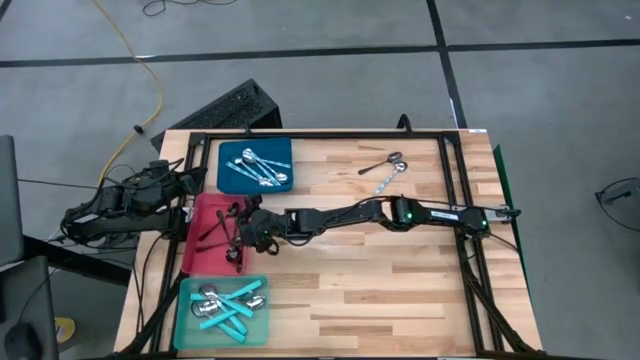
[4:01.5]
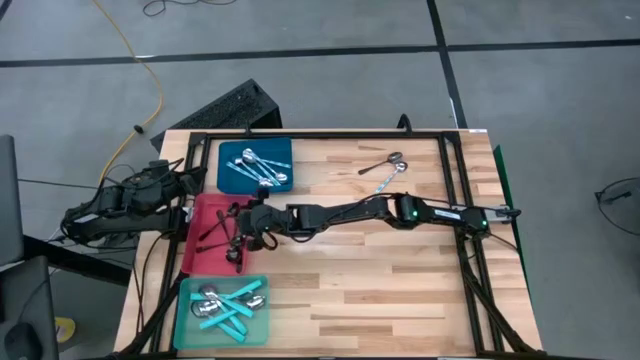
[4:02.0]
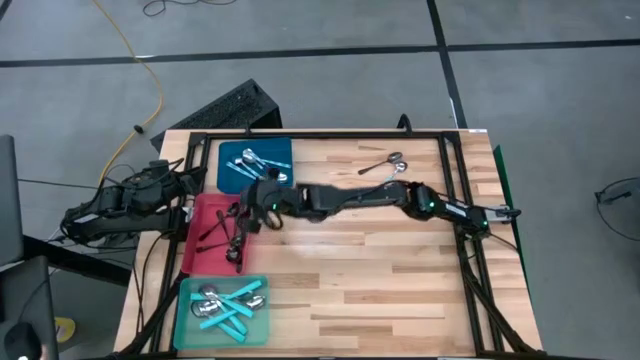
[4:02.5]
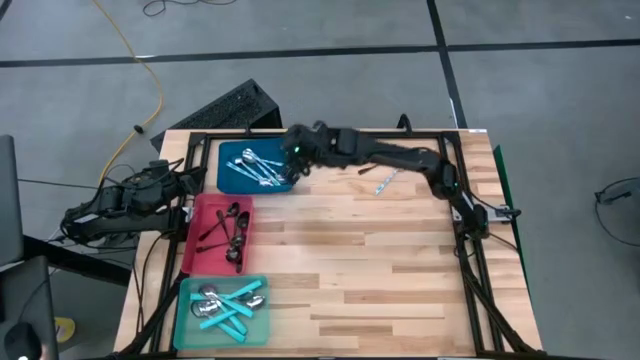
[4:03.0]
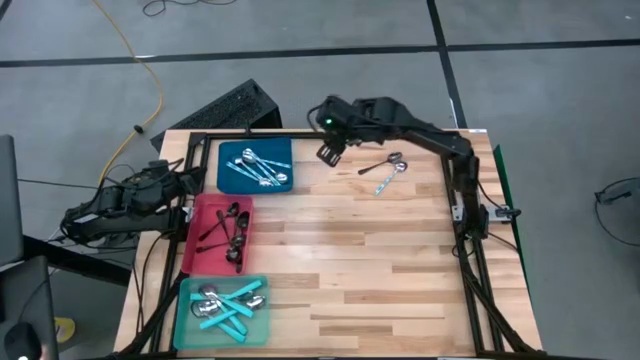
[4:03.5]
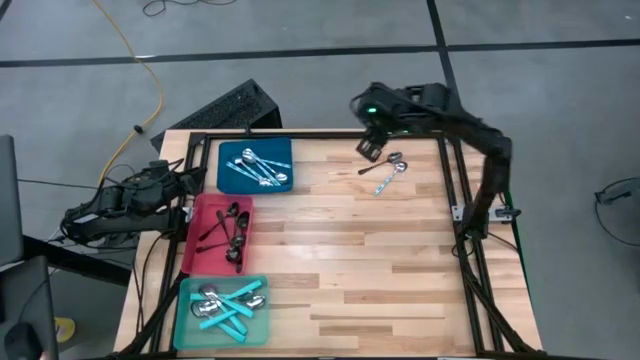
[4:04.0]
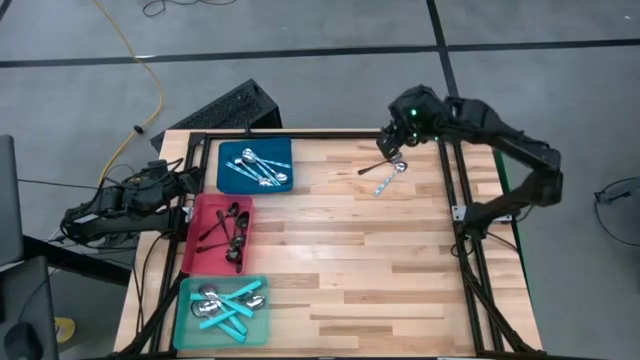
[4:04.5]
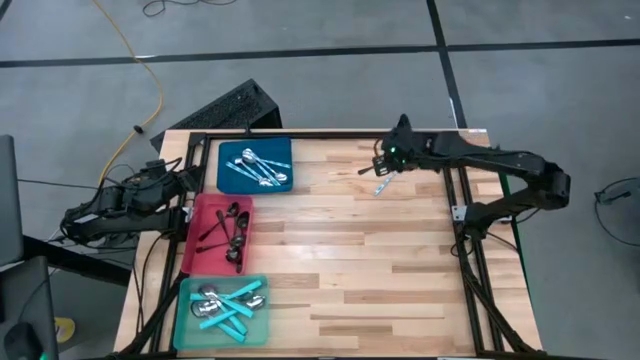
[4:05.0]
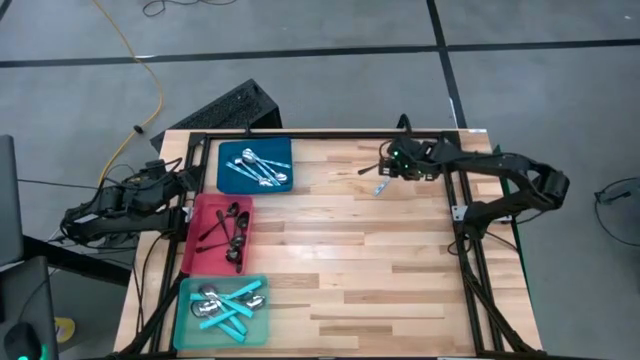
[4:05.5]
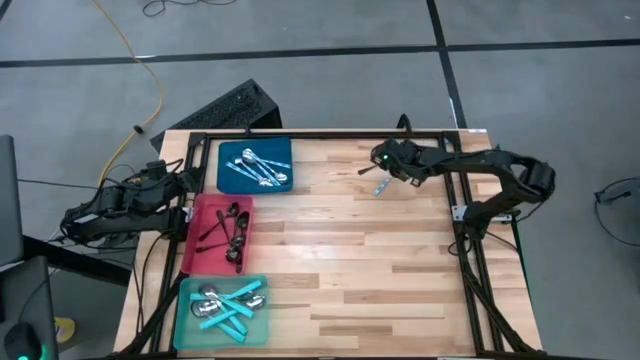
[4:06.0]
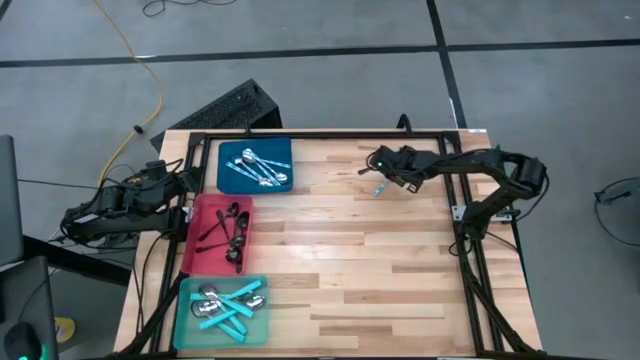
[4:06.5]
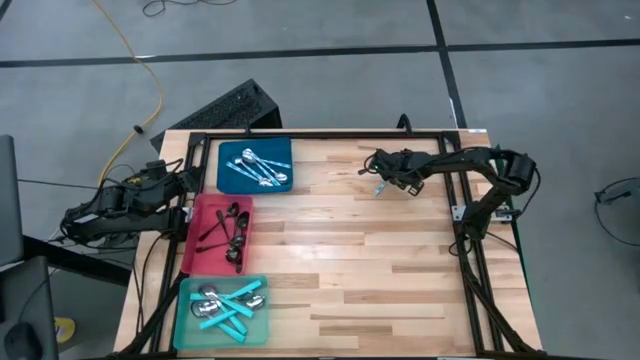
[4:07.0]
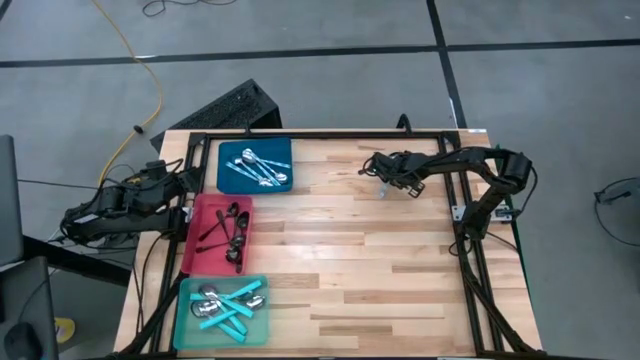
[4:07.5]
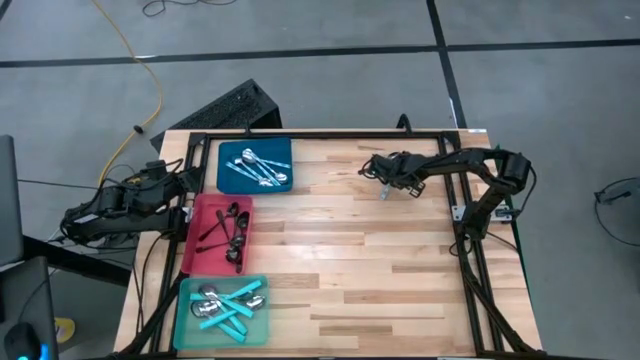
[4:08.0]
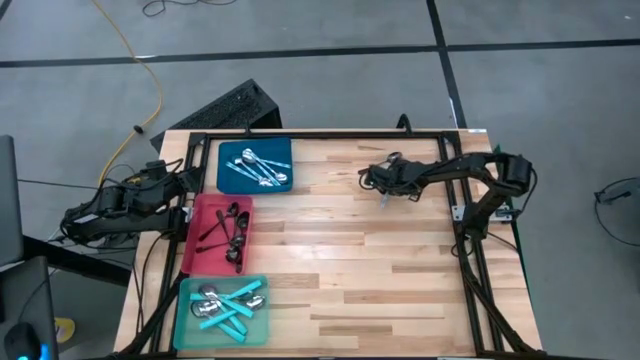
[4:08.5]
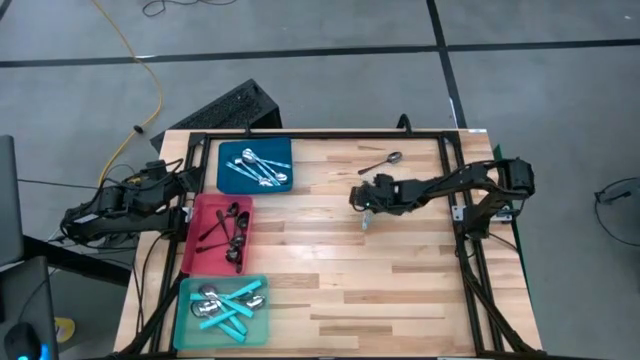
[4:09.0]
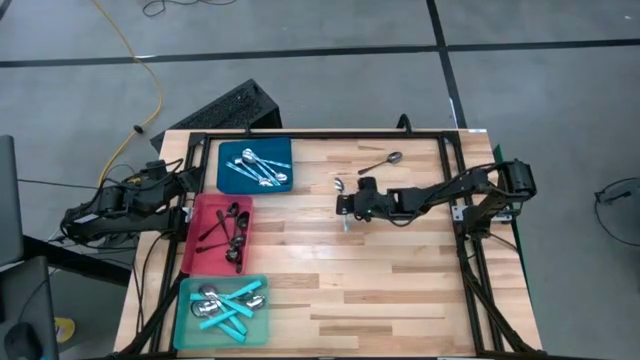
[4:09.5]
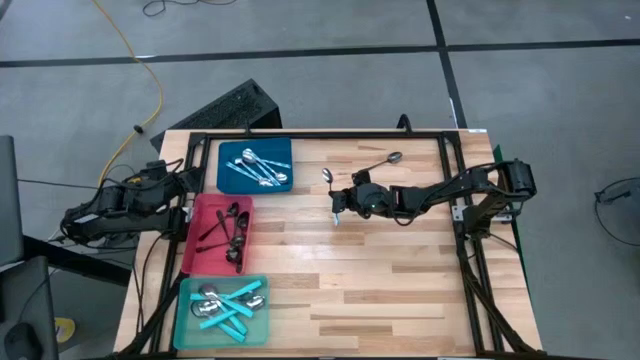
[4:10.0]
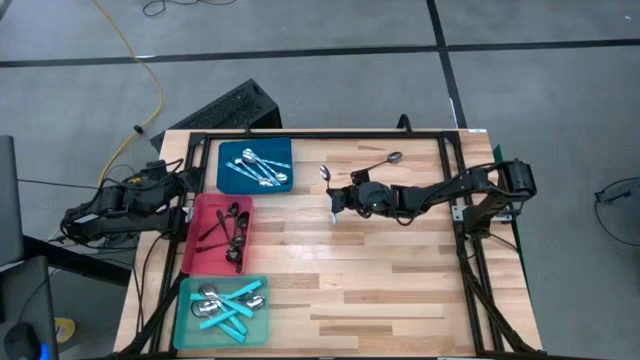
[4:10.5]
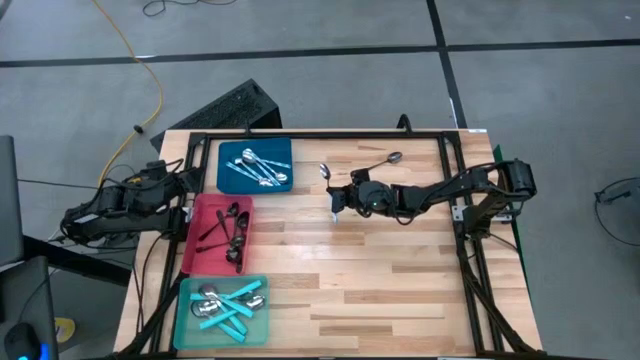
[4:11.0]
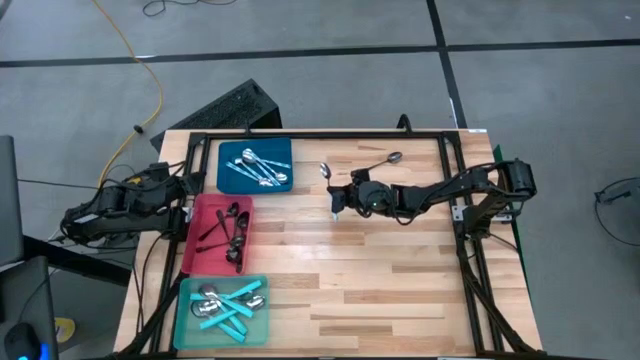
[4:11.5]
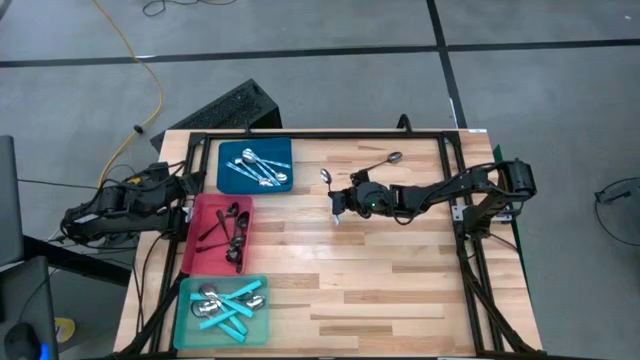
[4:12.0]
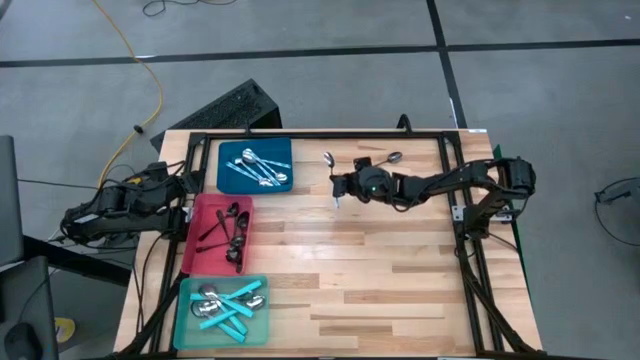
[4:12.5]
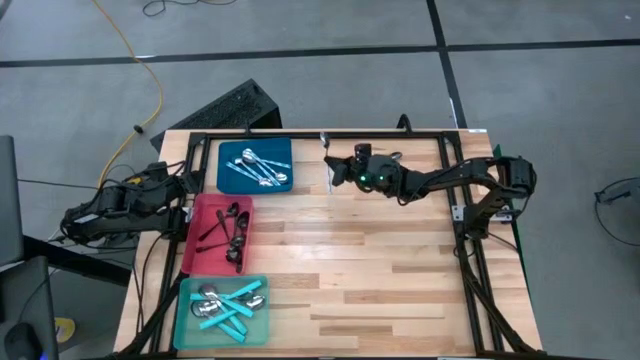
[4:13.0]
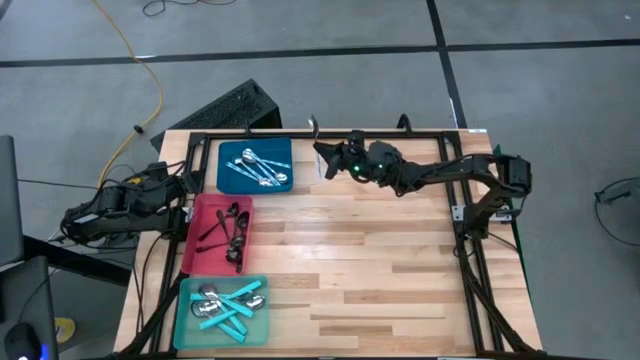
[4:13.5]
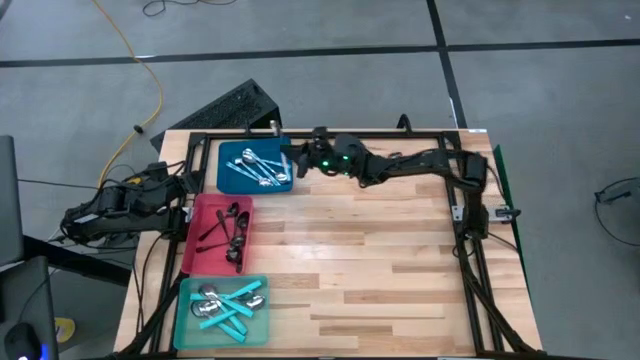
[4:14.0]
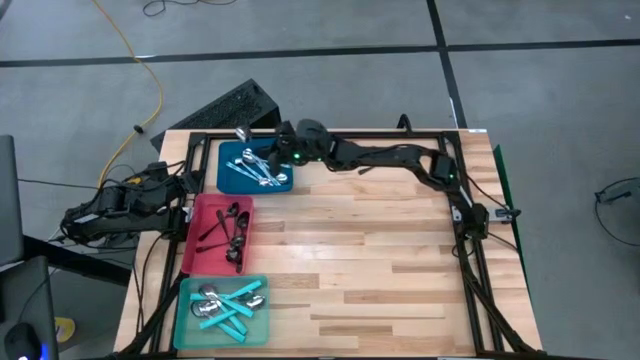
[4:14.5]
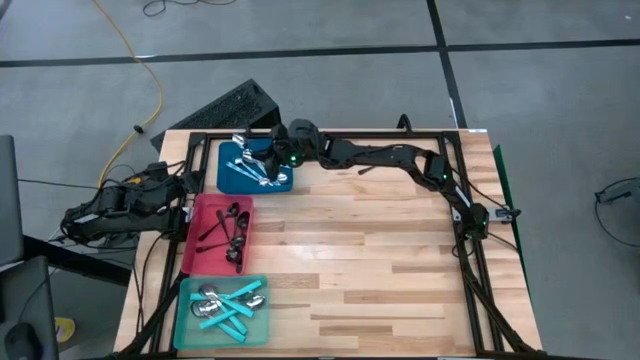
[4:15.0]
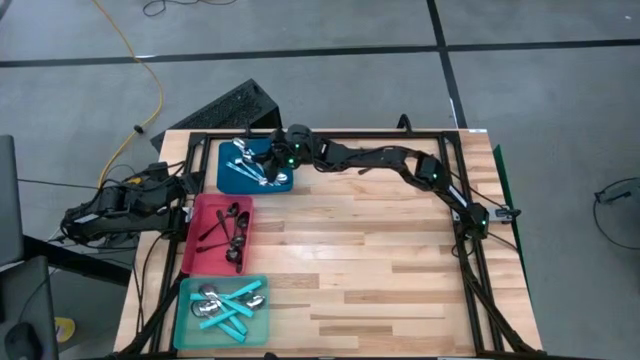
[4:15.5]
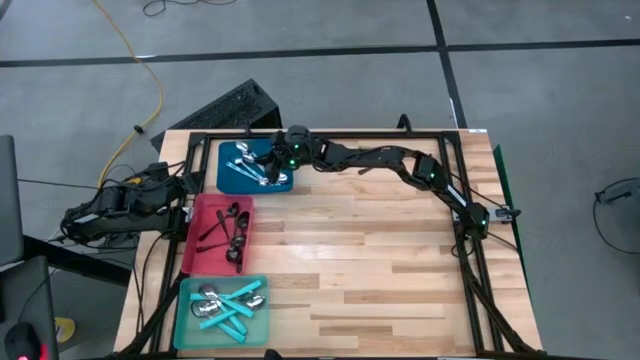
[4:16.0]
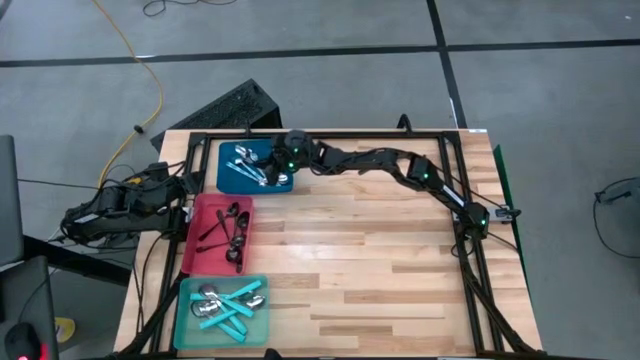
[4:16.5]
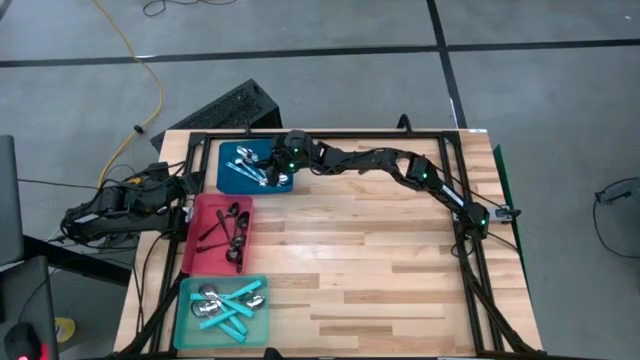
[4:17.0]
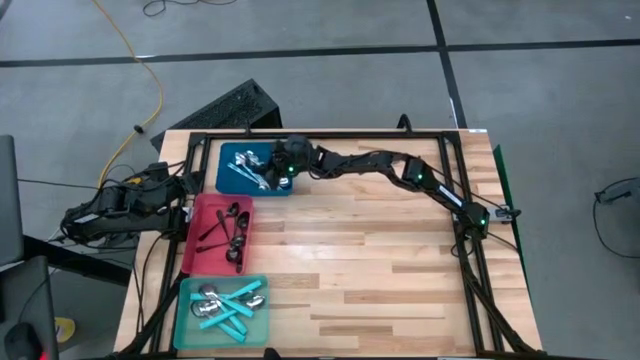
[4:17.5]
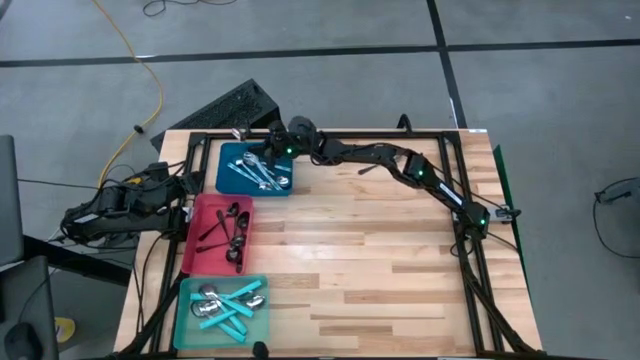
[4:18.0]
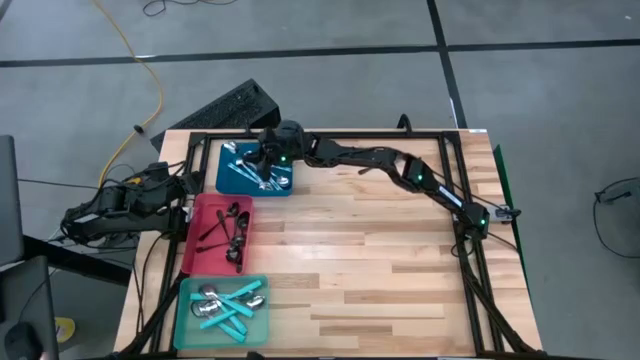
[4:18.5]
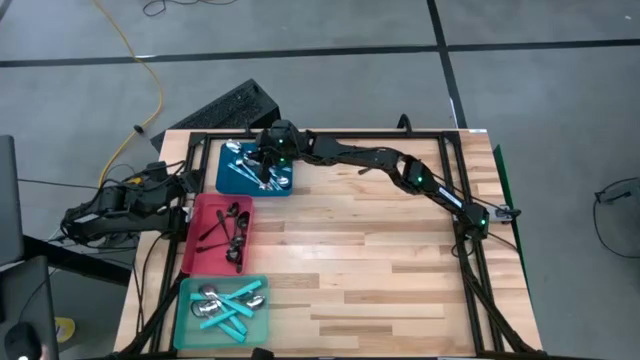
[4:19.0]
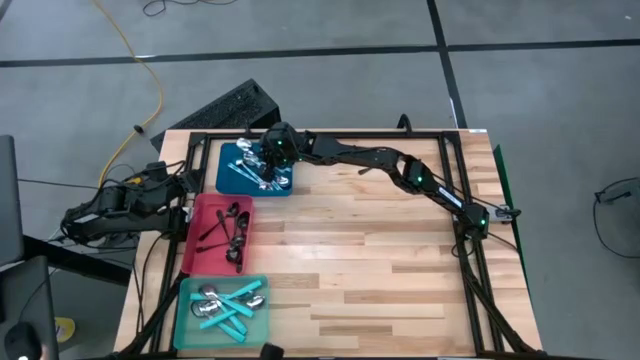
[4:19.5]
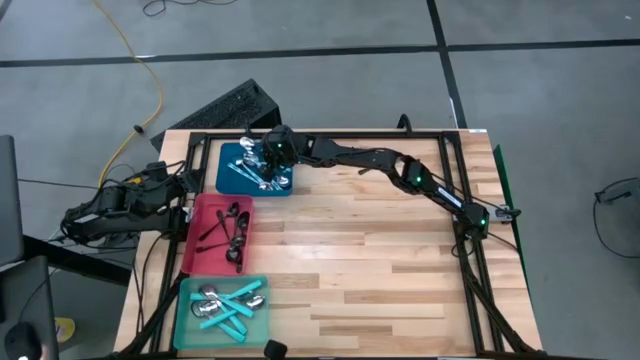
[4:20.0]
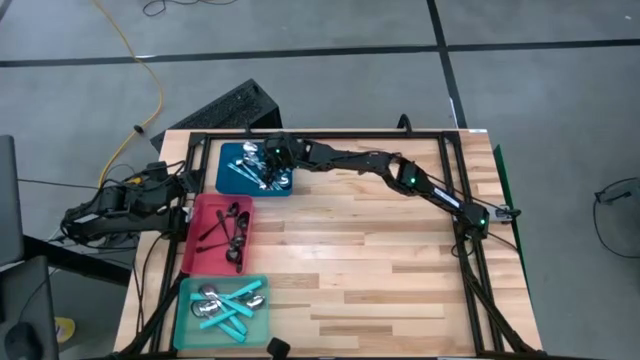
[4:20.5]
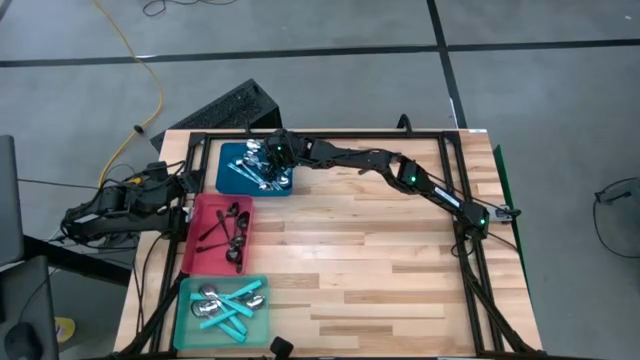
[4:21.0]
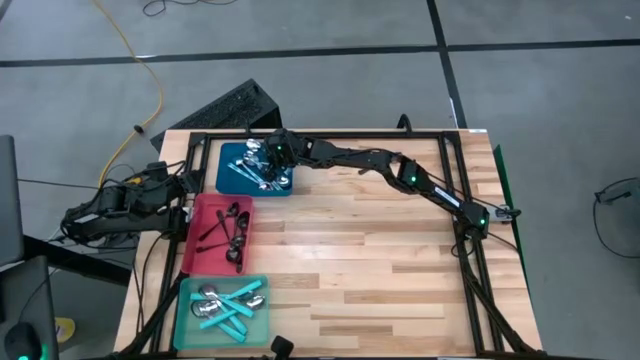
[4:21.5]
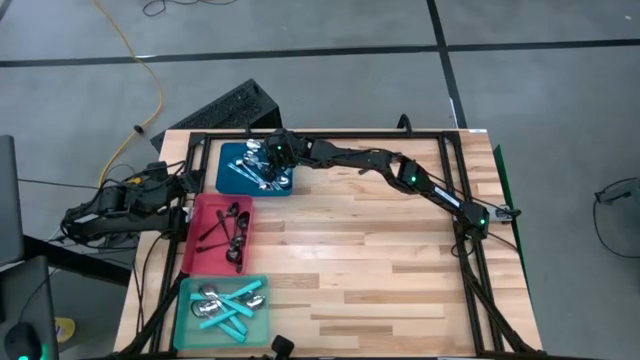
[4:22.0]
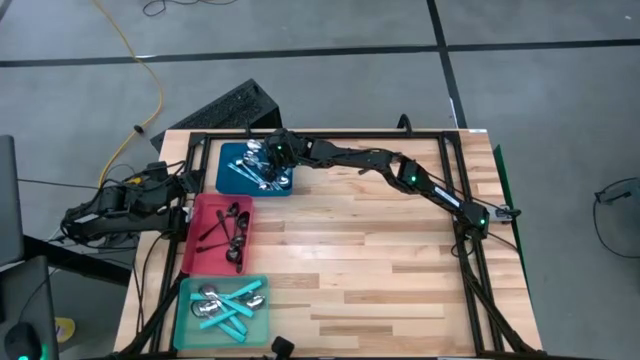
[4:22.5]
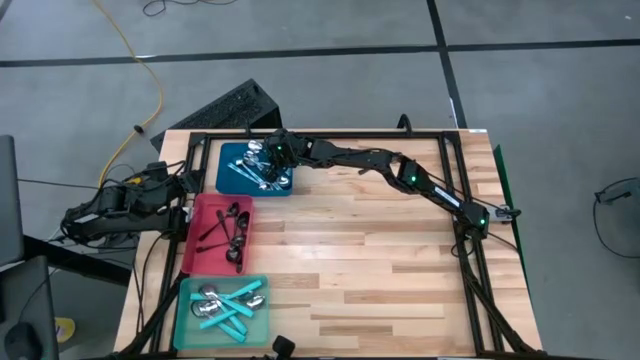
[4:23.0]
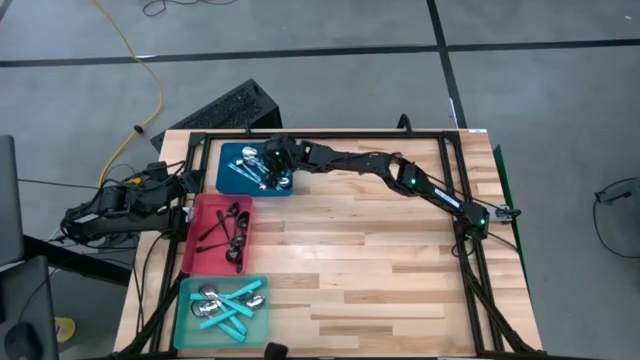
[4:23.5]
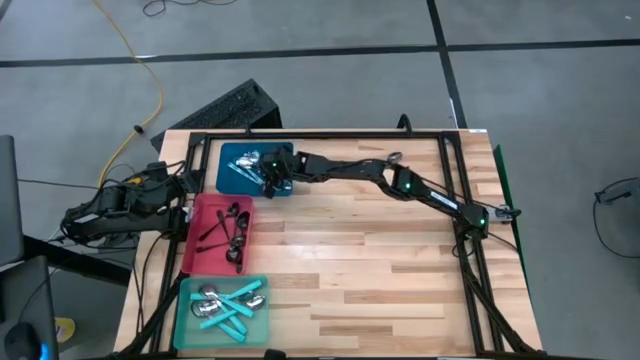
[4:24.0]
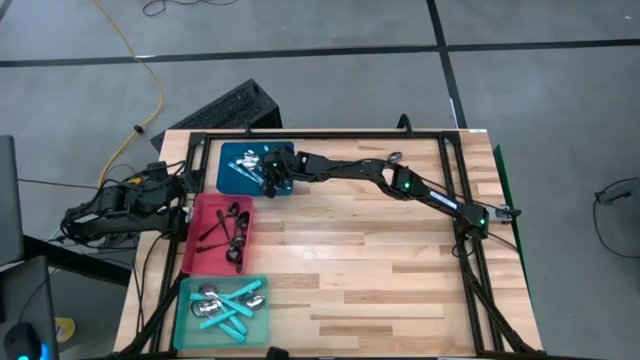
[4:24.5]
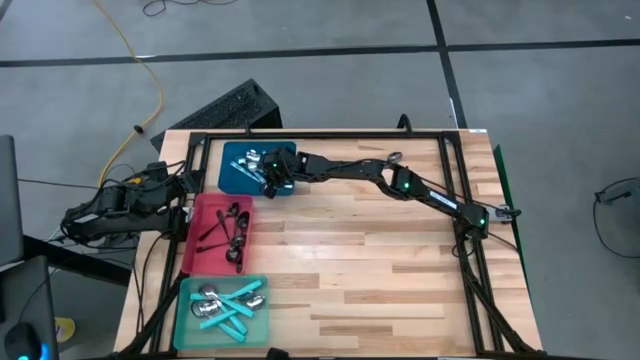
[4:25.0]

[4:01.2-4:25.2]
Task: Sort silverware by color (type)
Put the blue patterned spoon into the blue bin
